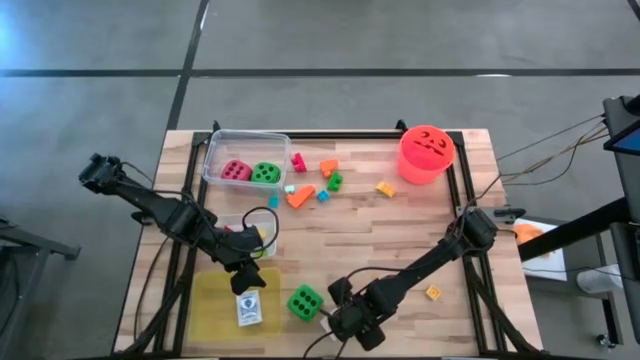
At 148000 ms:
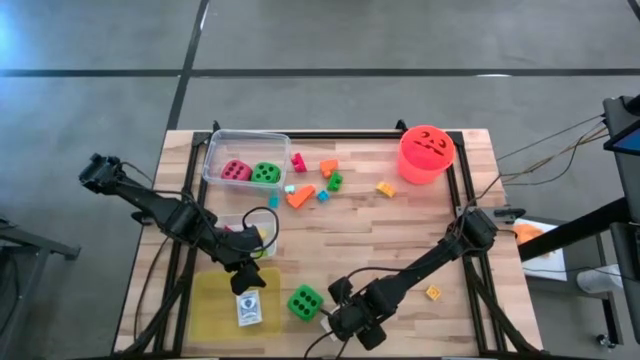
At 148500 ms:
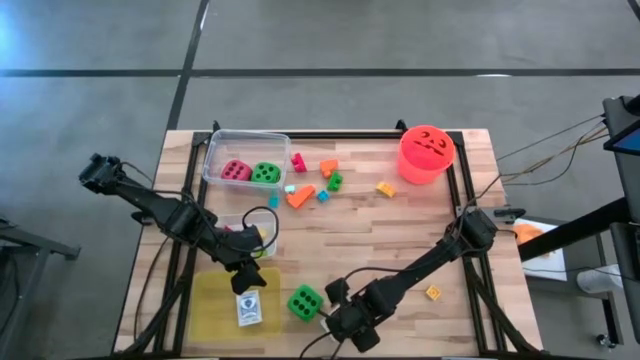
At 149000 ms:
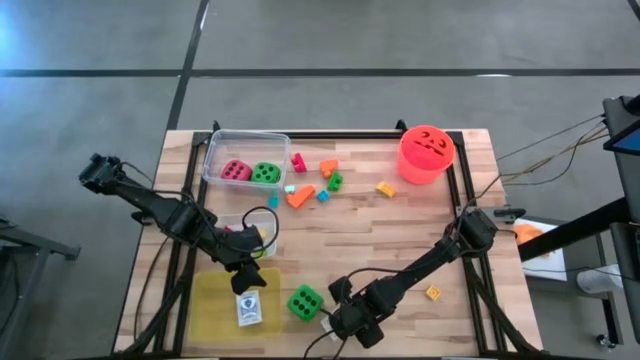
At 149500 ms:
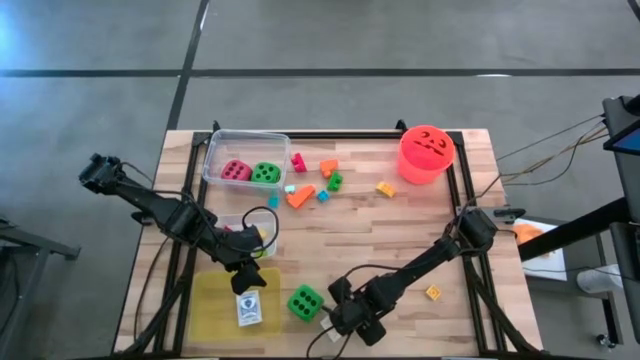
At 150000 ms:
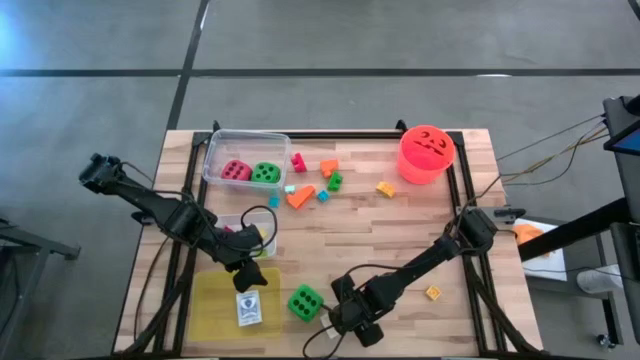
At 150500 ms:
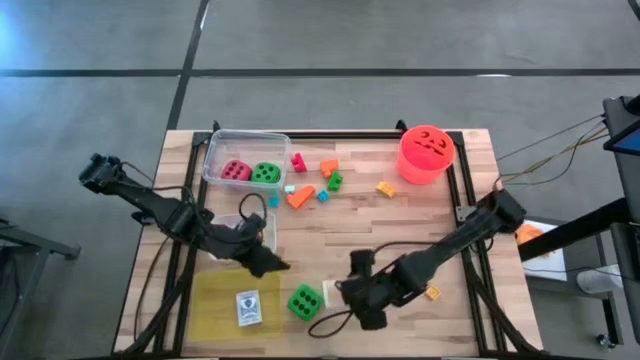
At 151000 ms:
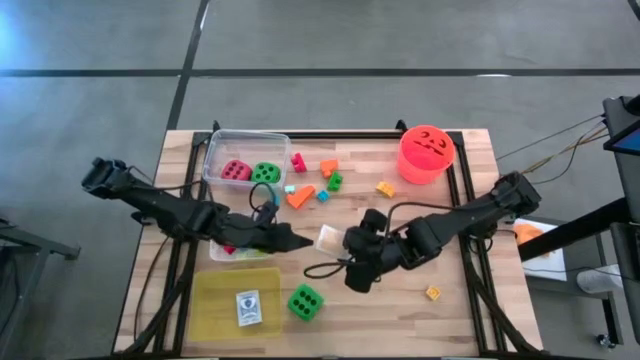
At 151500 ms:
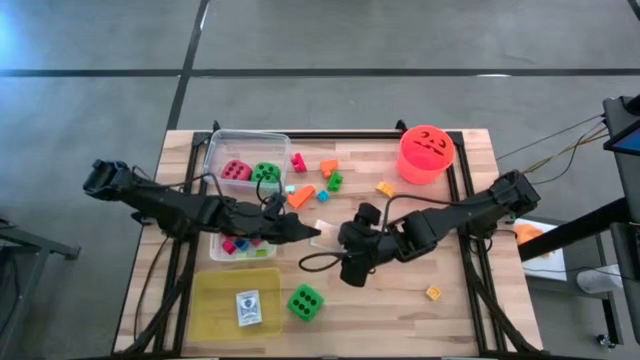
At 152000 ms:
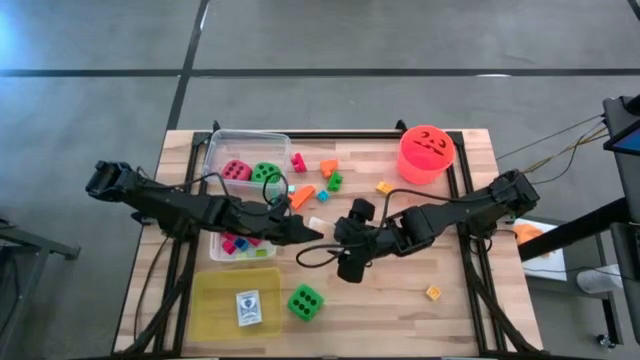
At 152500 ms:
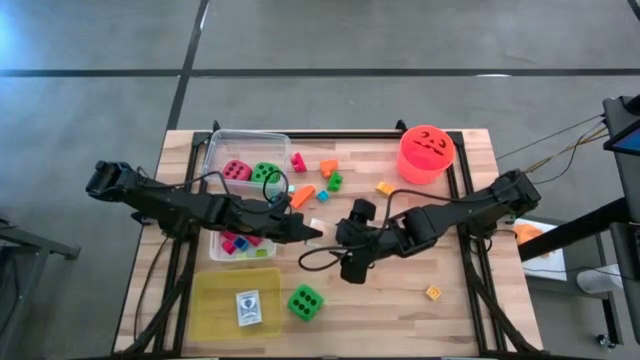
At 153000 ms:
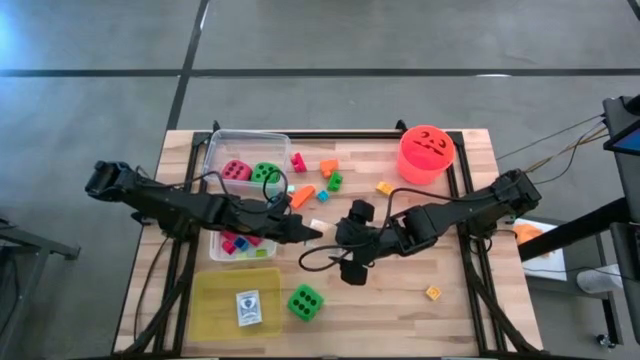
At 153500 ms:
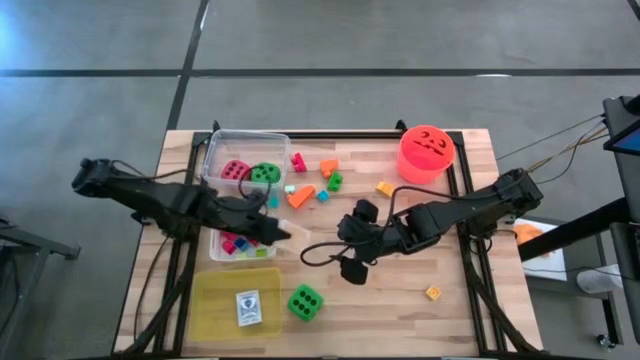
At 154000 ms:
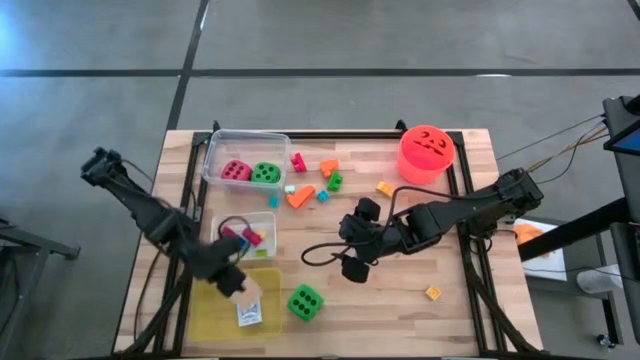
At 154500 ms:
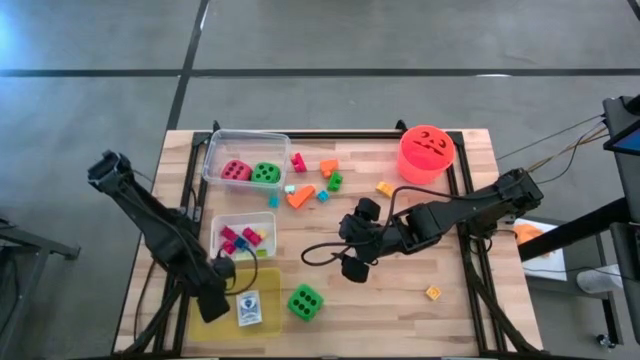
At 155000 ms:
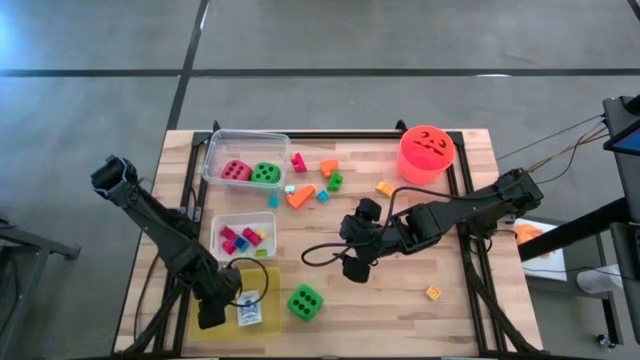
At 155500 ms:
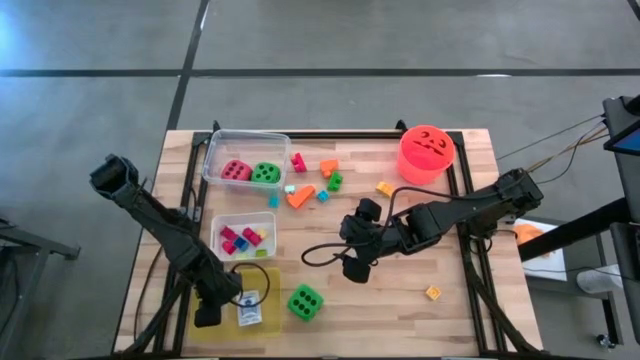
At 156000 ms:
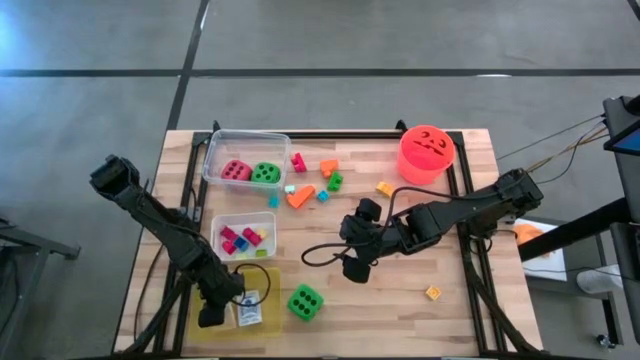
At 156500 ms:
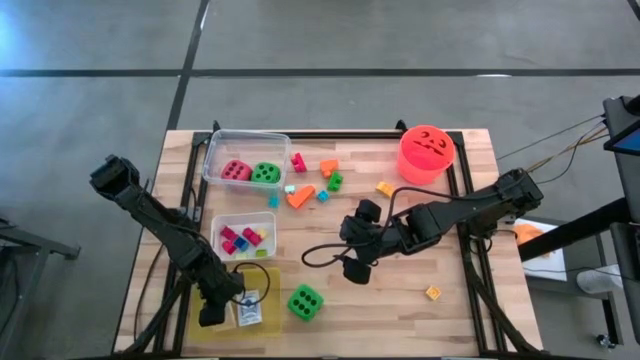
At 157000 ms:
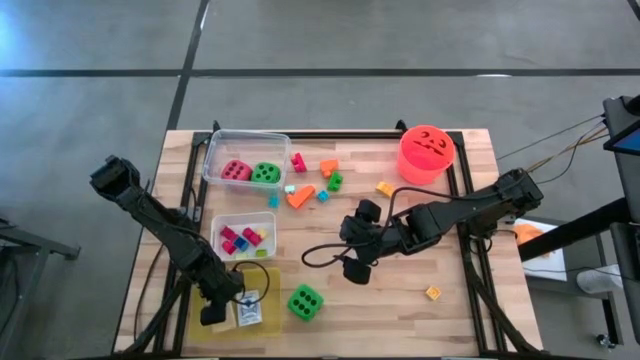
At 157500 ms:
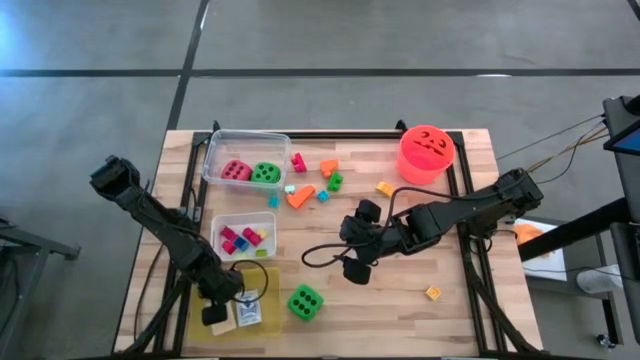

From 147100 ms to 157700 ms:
Task: Pick & Place Toys
Put the orange deck of cards into the yellow bin

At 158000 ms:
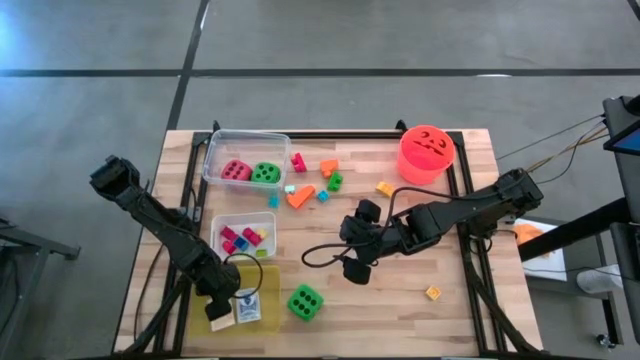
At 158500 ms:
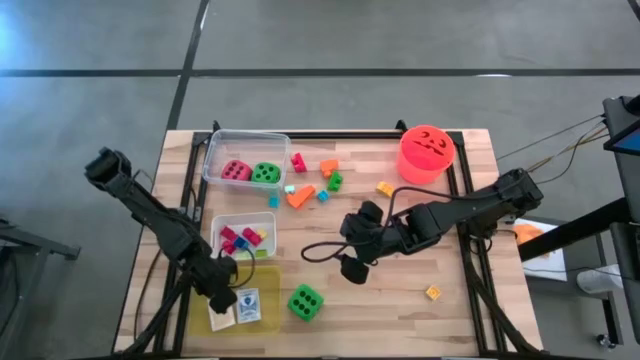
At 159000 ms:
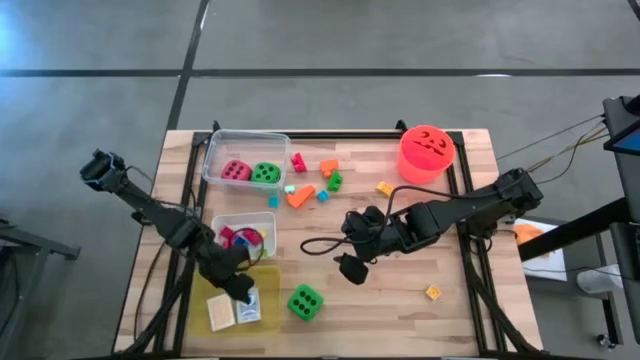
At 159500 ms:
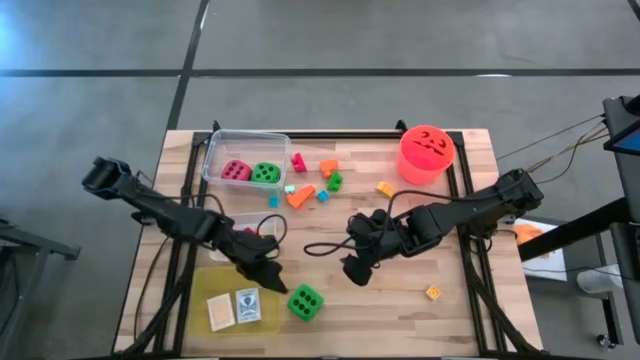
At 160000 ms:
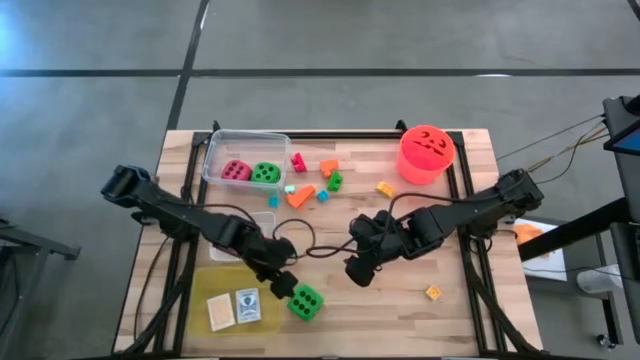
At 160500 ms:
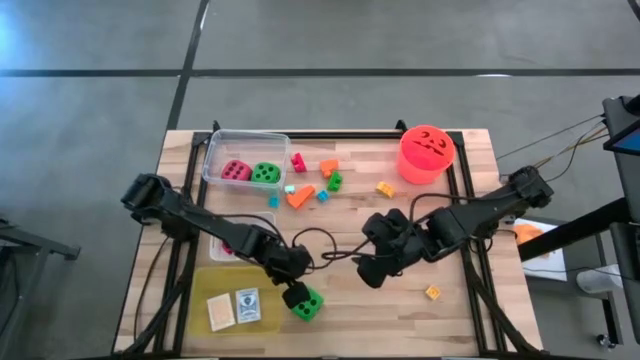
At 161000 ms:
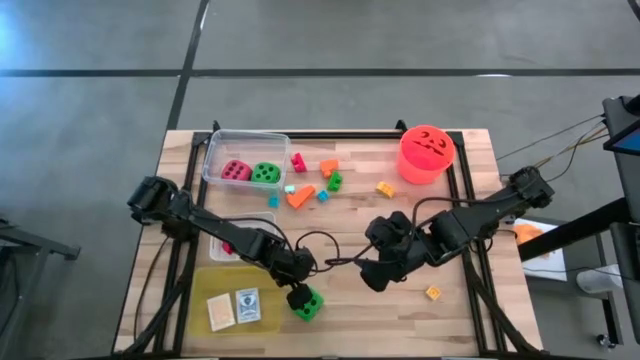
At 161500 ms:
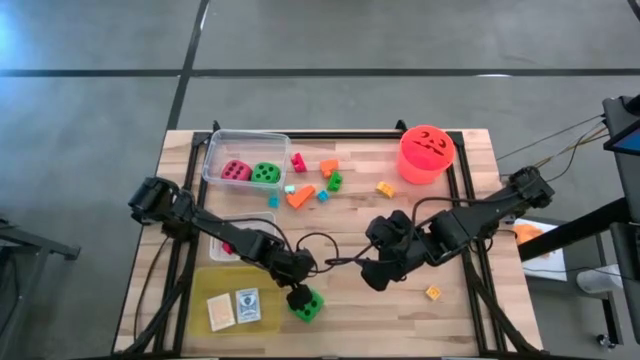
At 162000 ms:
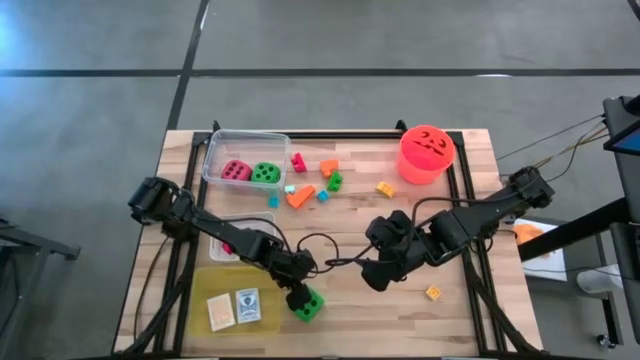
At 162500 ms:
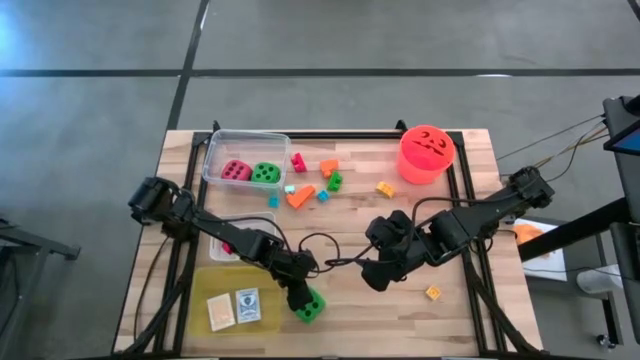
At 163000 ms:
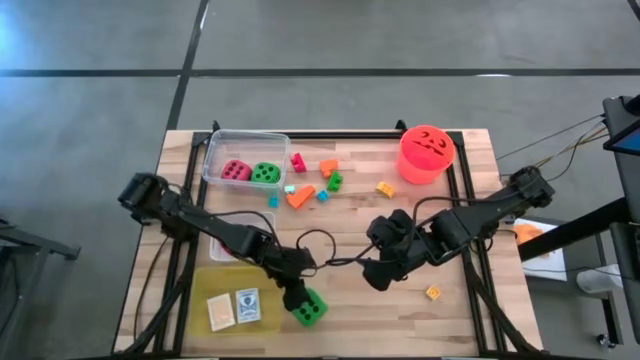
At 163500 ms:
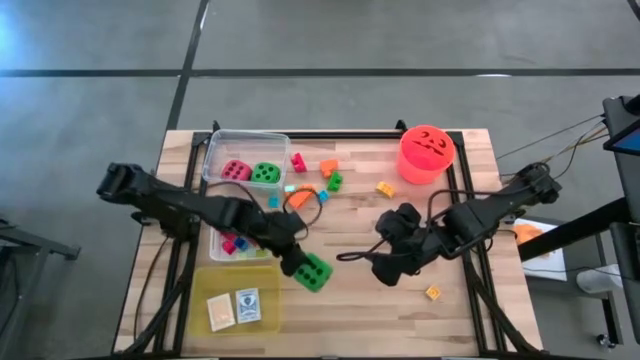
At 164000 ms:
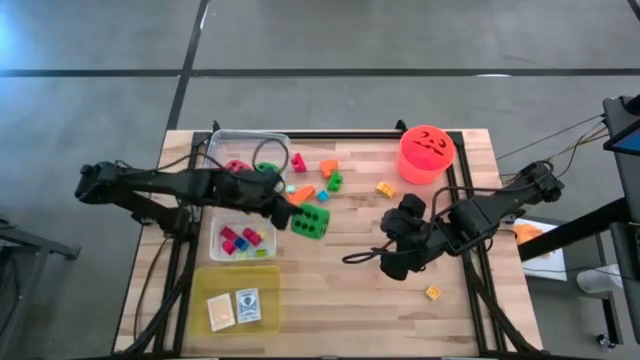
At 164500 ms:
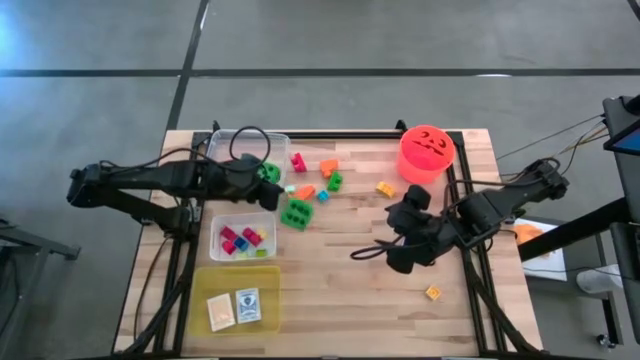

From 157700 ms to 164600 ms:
Put the green dice into the transparent bin

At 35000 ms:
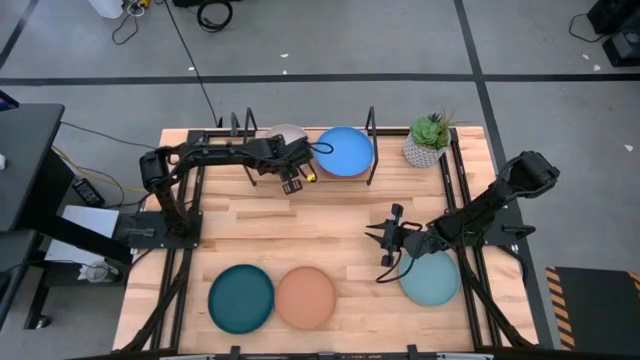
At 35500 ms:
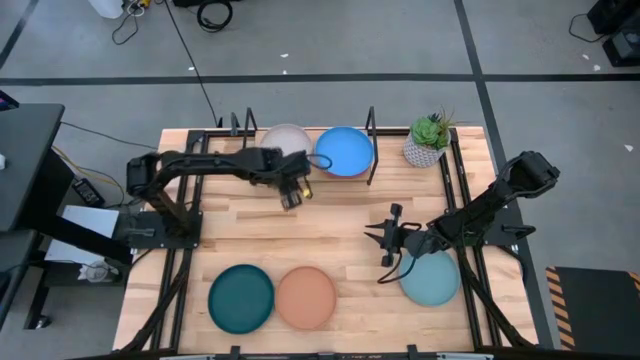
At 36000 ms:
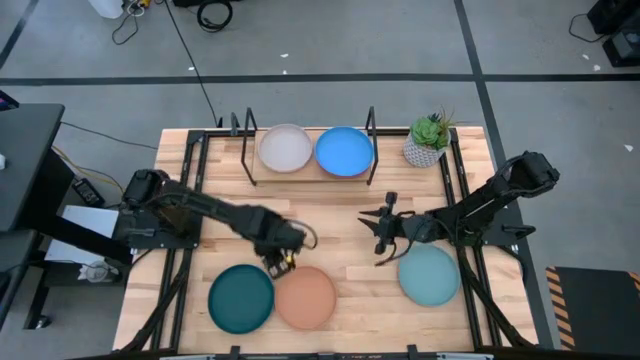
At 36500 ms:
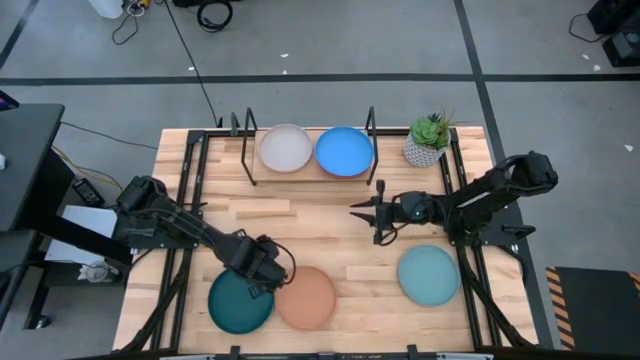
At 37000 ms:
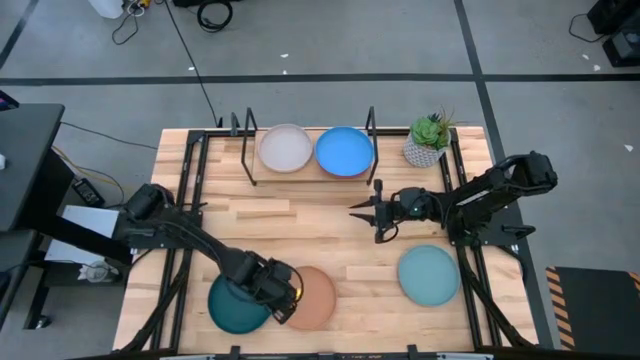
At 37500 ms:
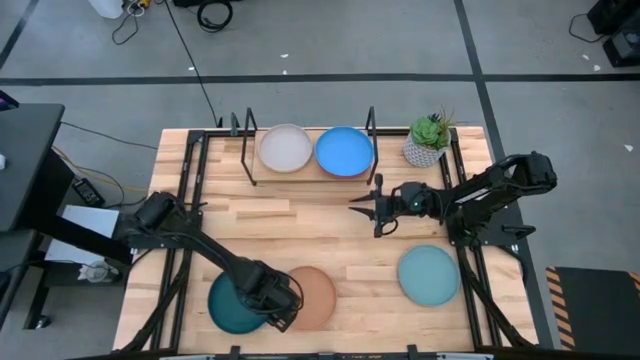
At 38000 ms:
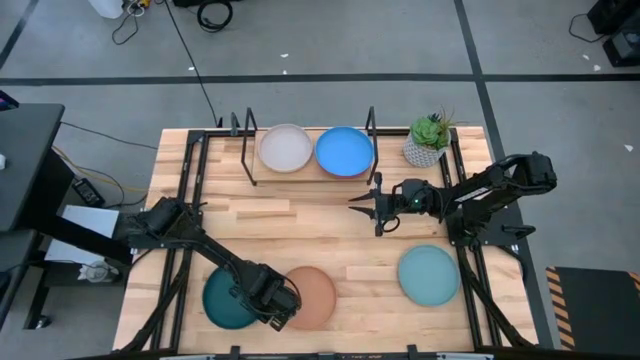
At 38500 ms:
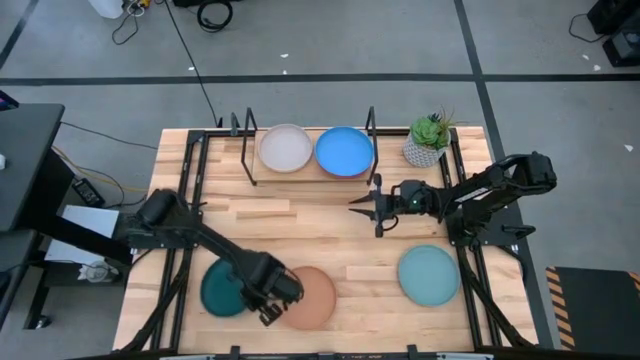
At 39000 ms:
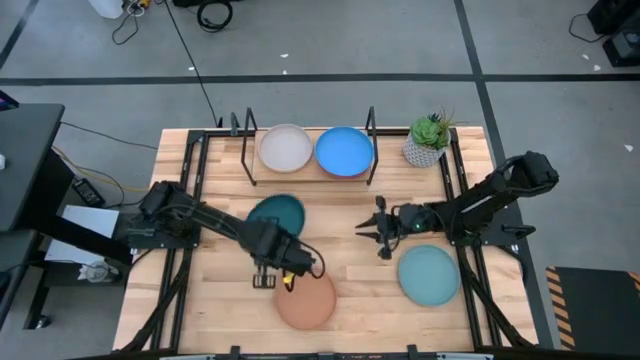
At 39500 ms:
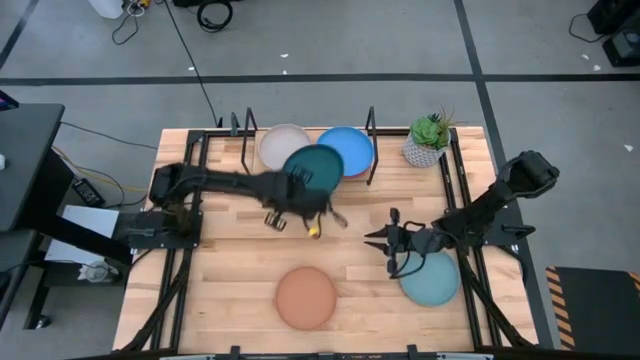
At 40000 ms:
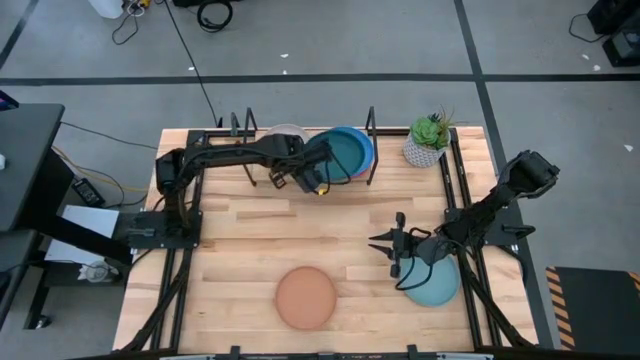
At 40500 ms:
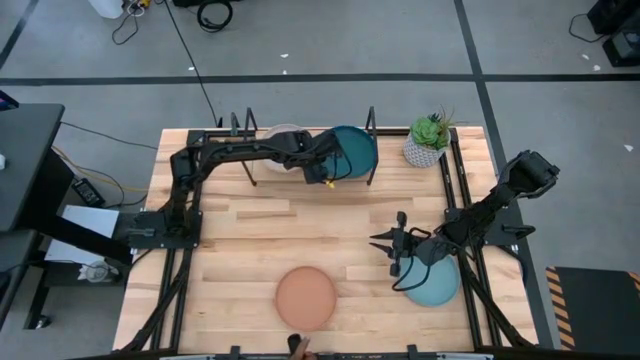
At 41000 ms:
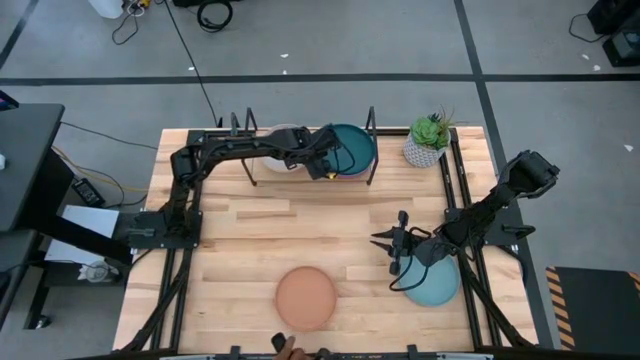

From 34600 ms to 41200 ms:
Task: Place and stack plates onto a shelf
Stack the dark green plate on top of the blue plate on the shelf
